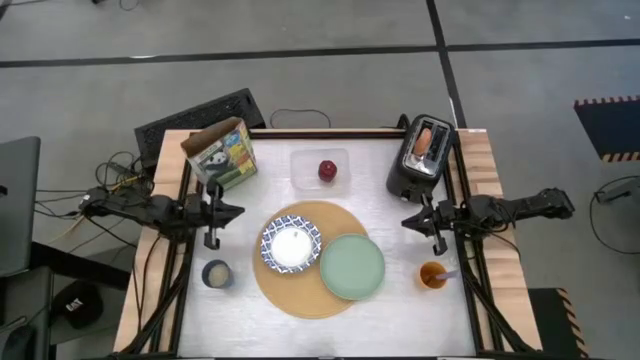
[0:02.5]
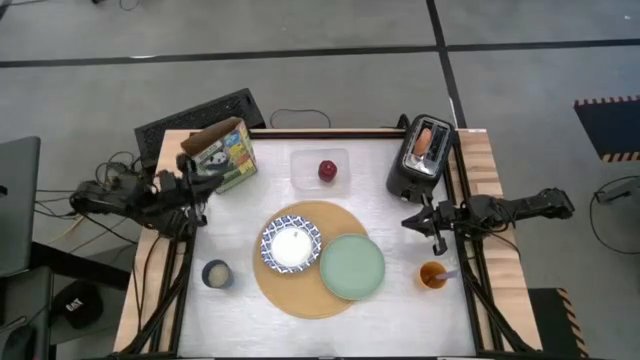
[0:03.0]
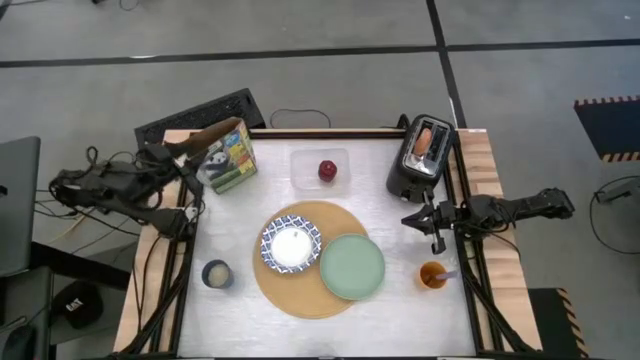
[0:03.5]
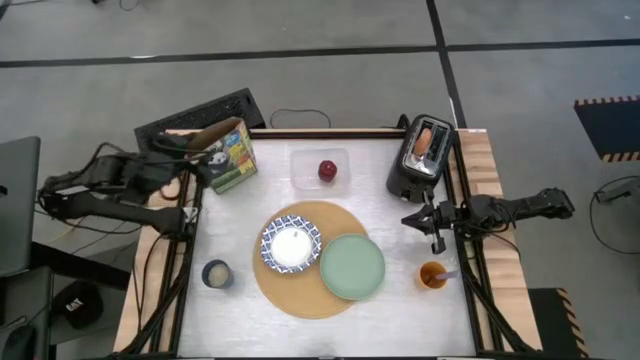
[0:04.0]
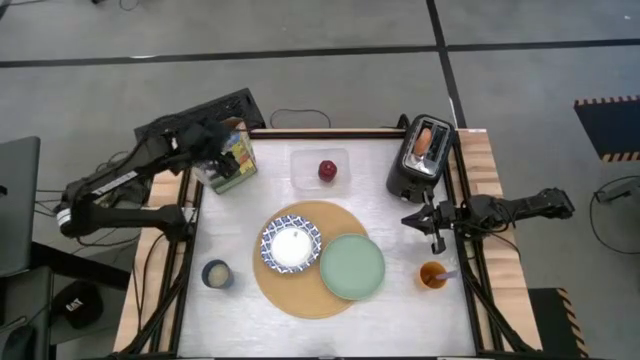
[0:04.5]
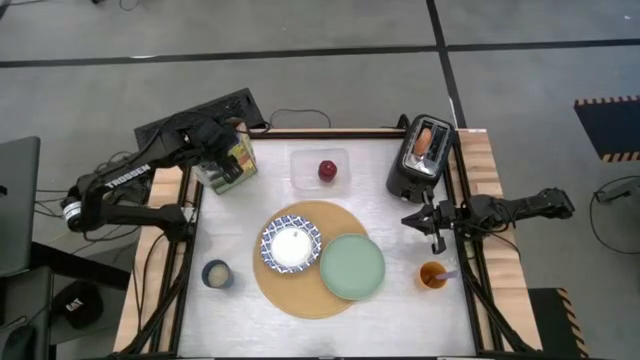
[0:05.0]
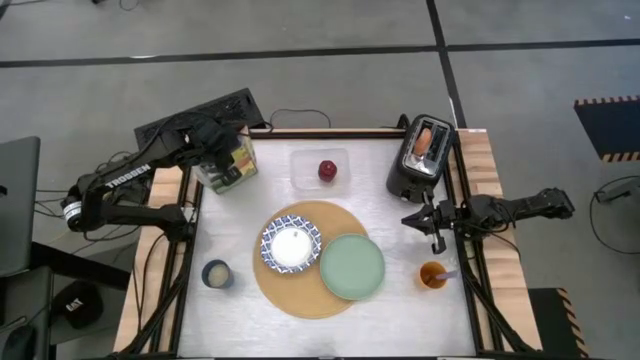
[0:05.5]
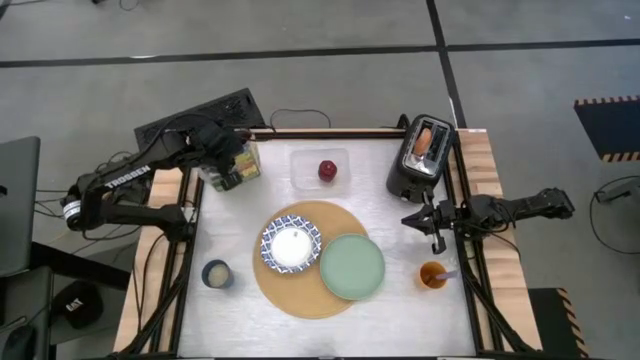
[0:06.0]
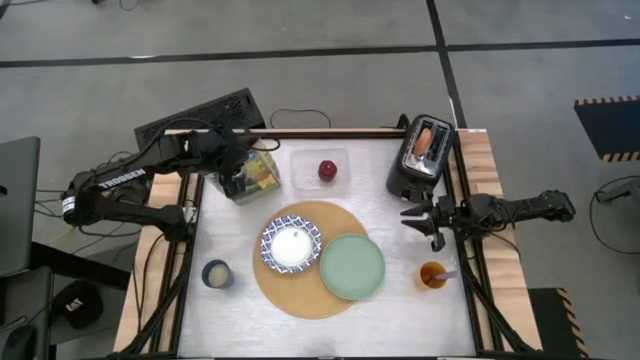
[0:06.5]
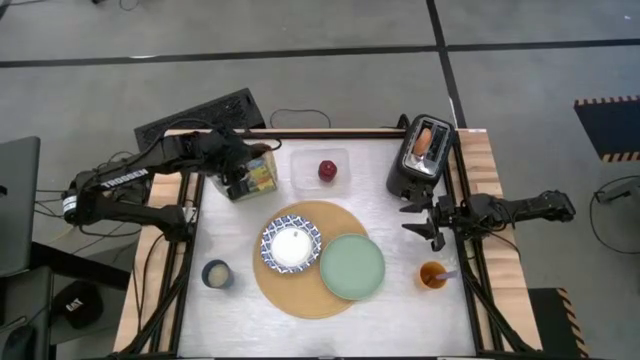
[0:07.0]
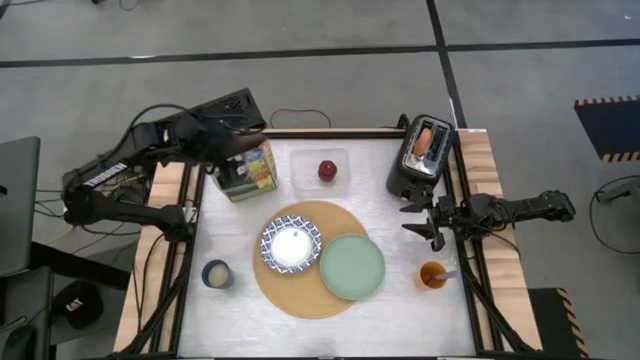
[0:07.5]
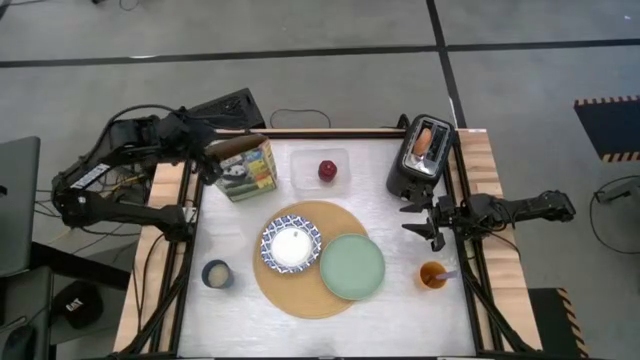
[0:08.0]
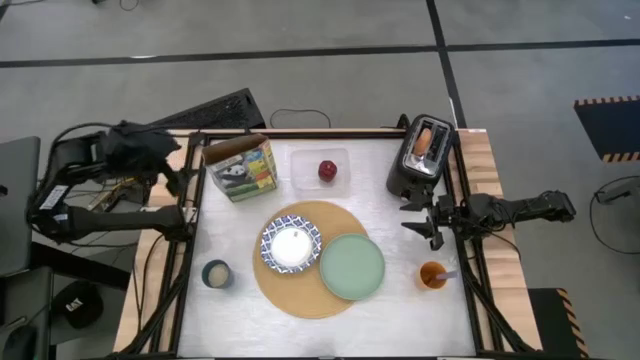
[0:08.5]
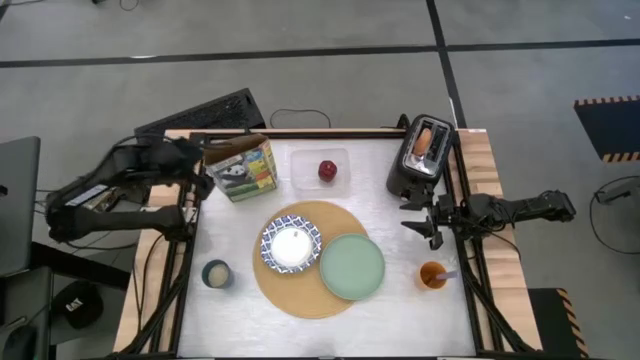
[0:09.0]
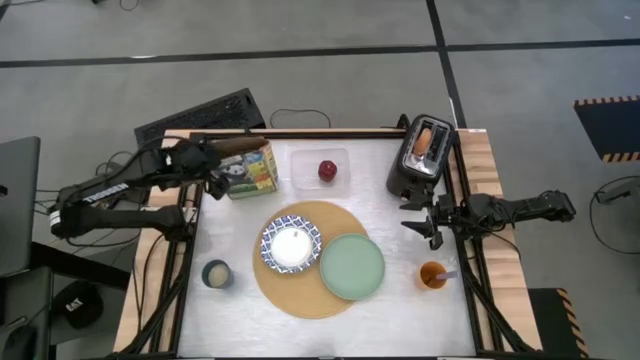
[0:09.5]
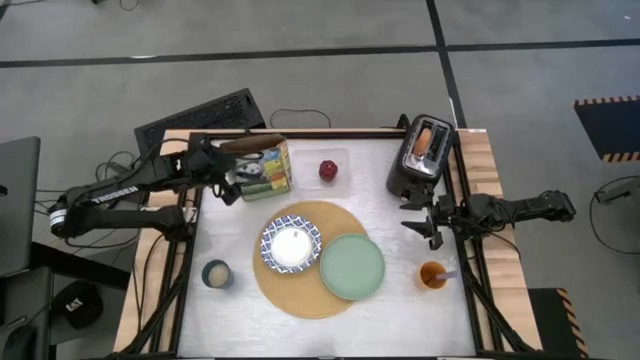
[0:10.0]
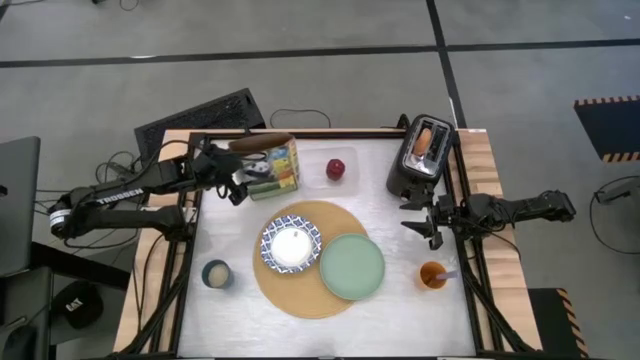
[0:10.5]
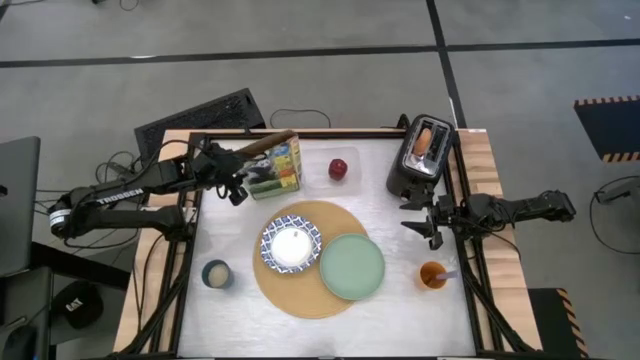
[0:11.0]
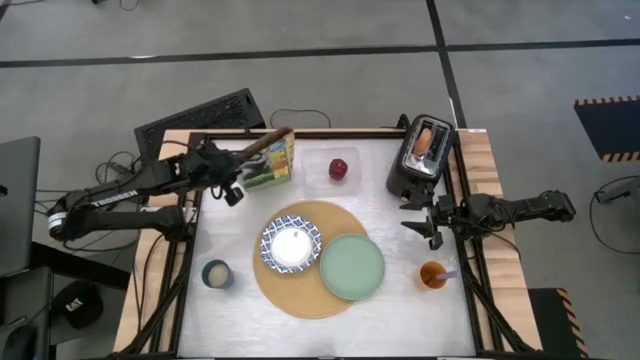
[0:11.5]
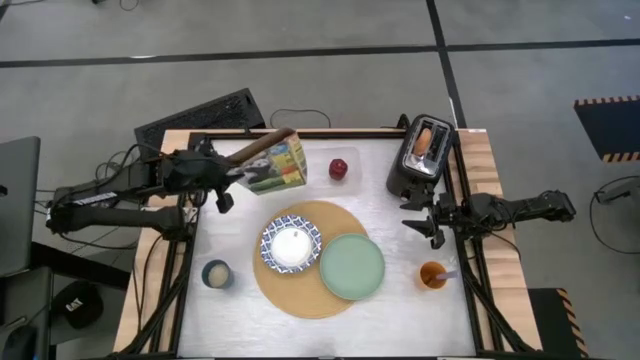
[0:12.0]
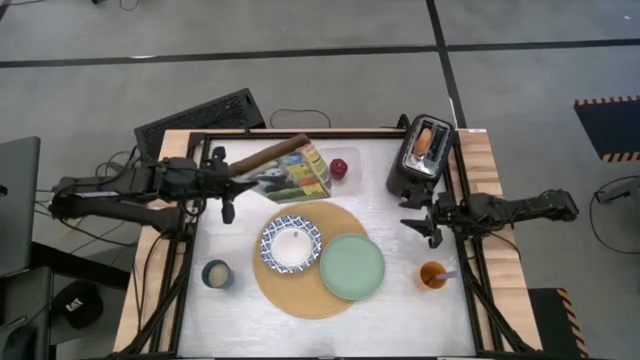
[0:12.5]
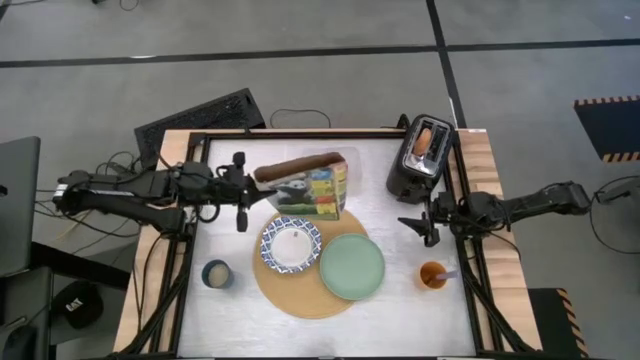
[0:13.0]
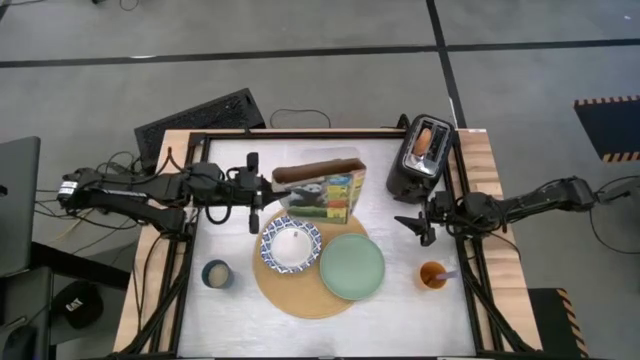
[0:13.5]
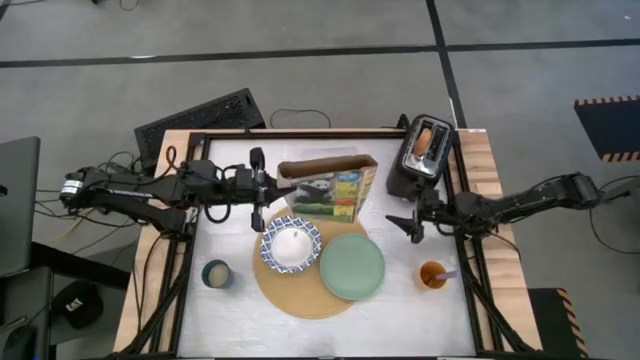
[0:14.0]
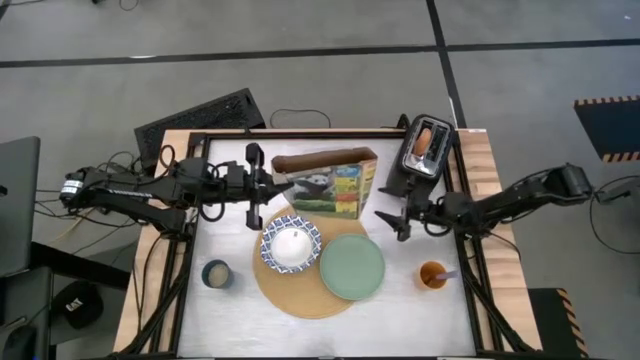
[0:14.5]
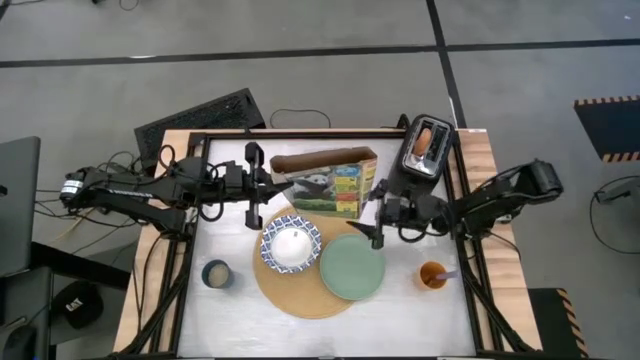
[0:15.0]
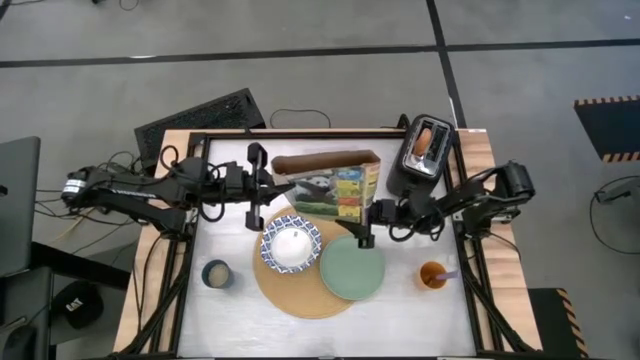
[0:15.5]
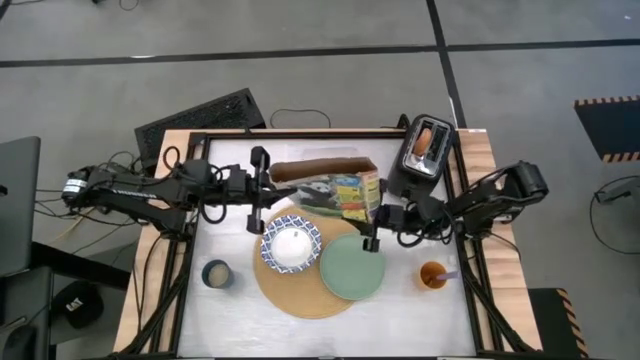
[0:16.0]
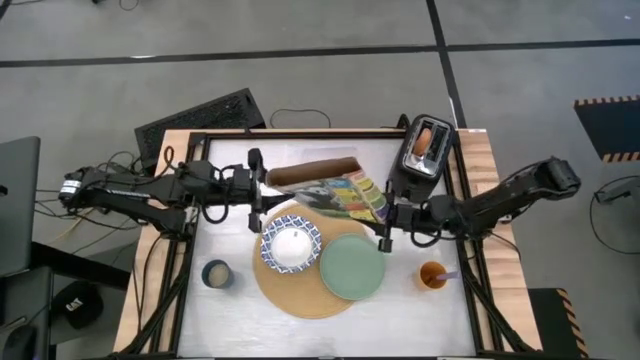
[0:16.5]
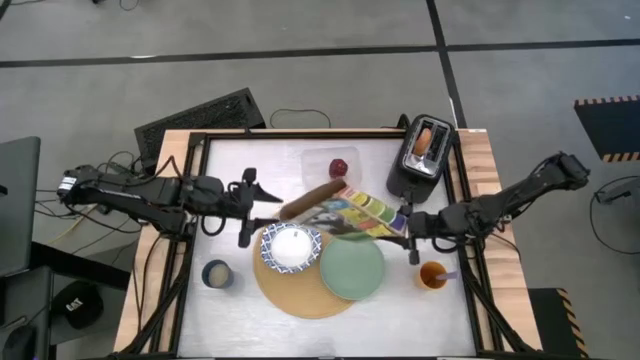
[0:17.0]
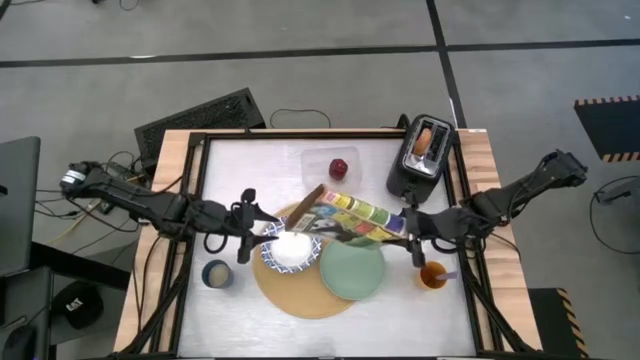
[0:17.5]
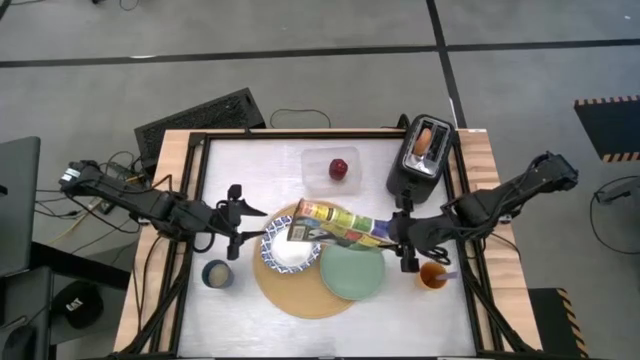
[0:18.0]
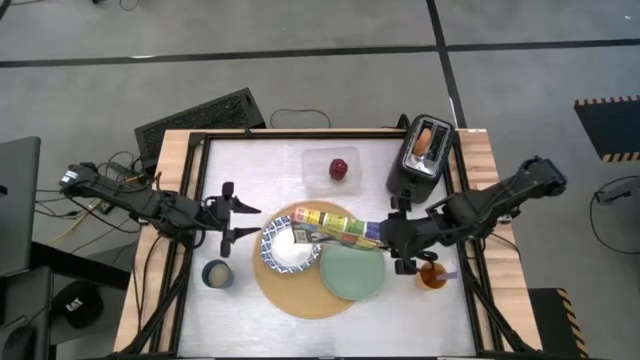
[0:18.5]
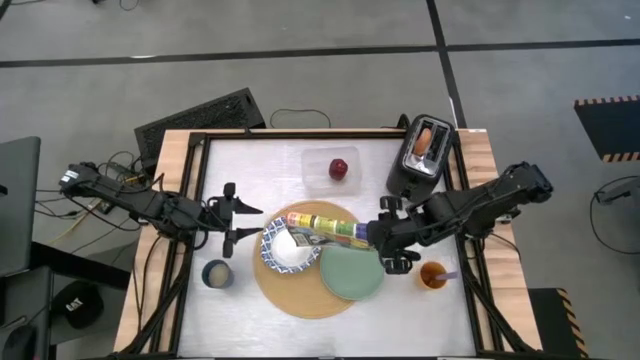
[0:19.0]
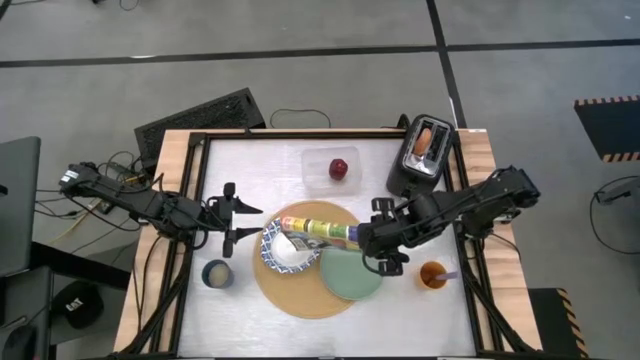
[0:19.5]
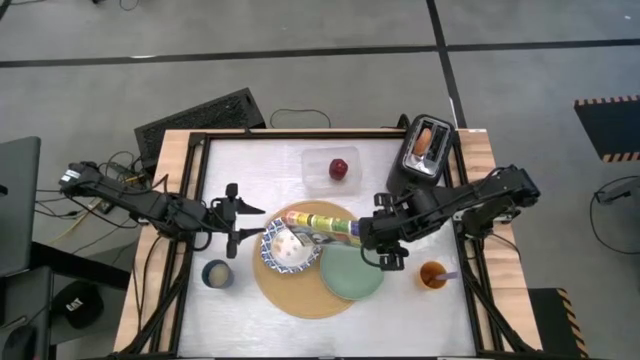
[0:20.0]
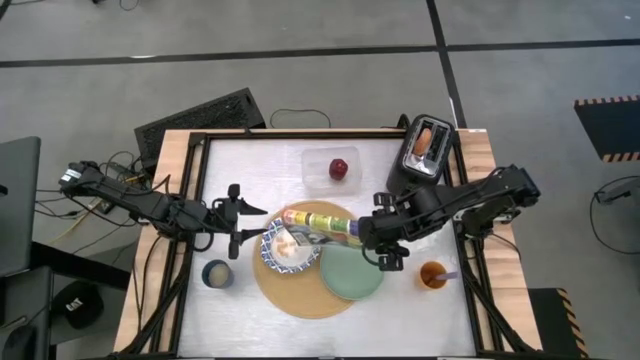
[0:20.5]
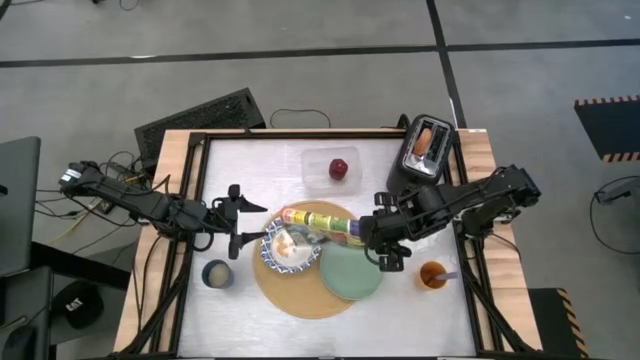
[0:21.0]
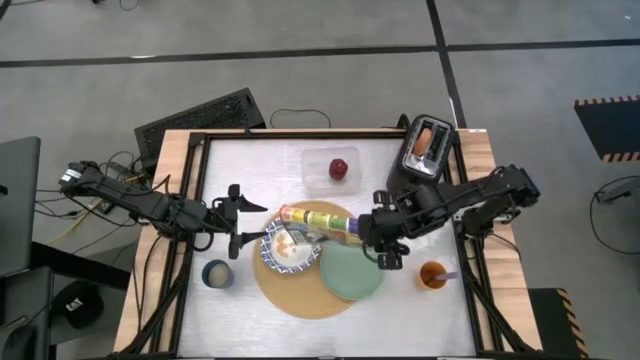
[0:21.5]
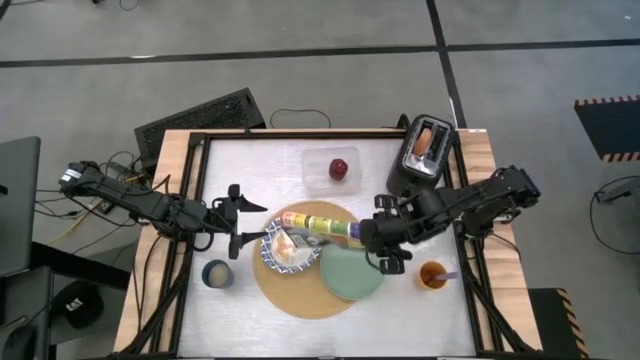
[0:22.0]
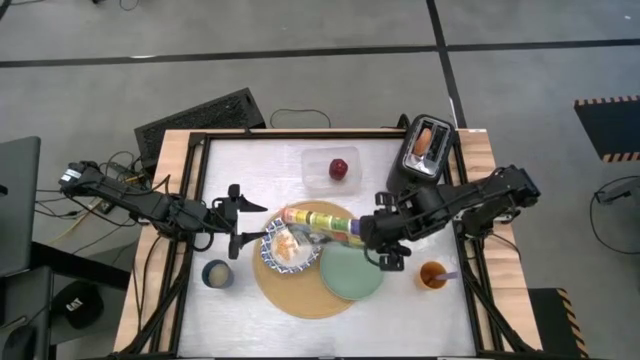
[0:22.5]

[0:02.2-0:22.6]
Task: Arrange a breakfast setting
Pour the cereal into the white patterned bowl
